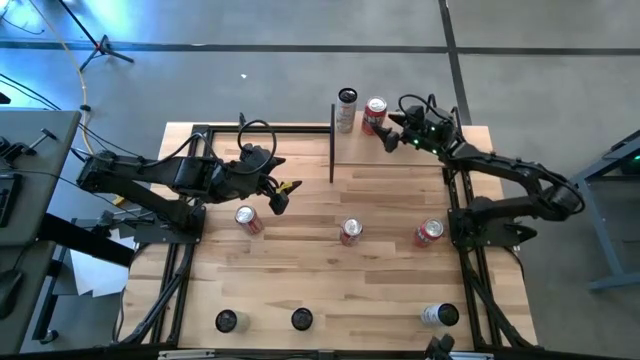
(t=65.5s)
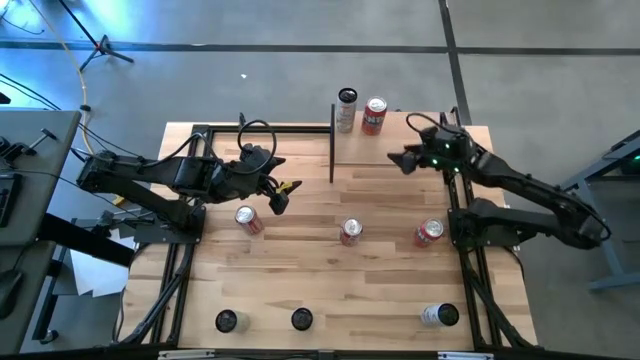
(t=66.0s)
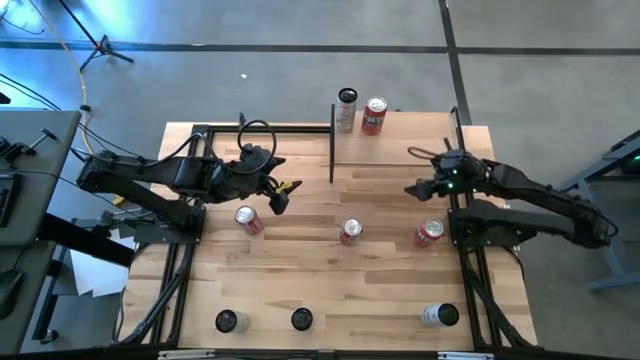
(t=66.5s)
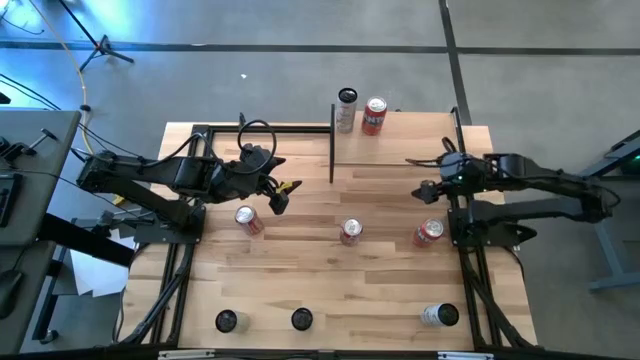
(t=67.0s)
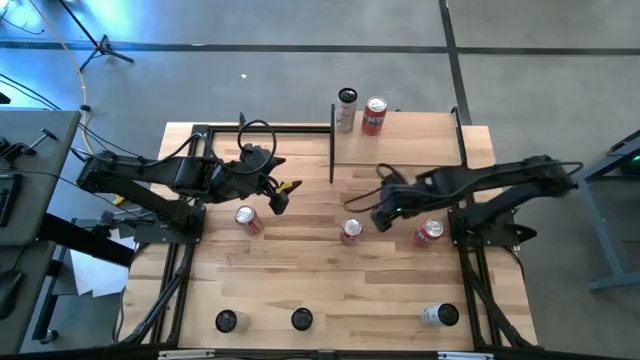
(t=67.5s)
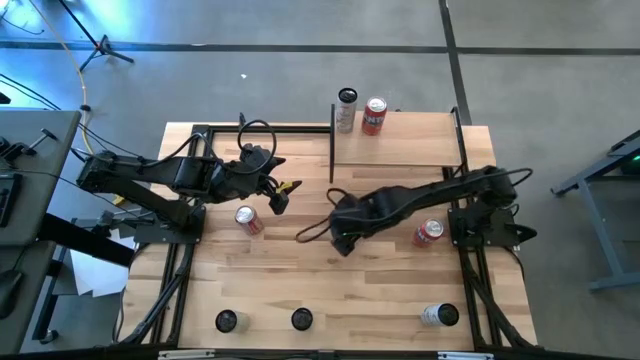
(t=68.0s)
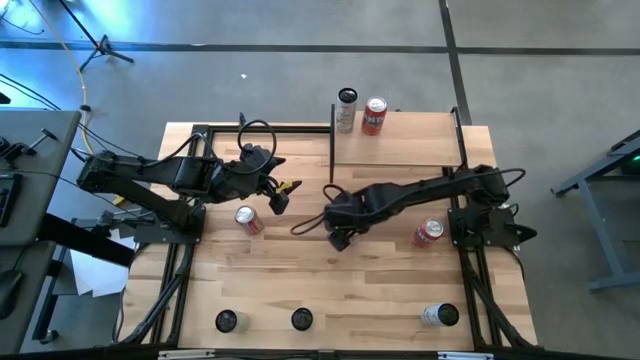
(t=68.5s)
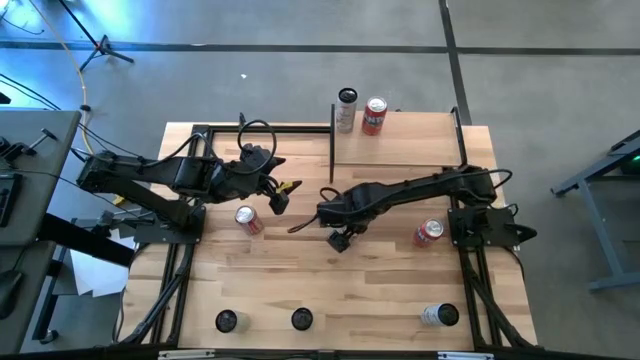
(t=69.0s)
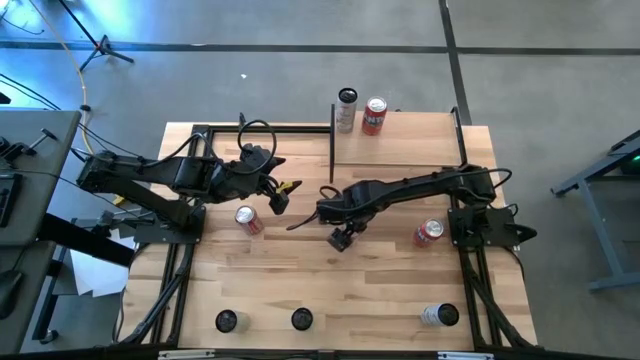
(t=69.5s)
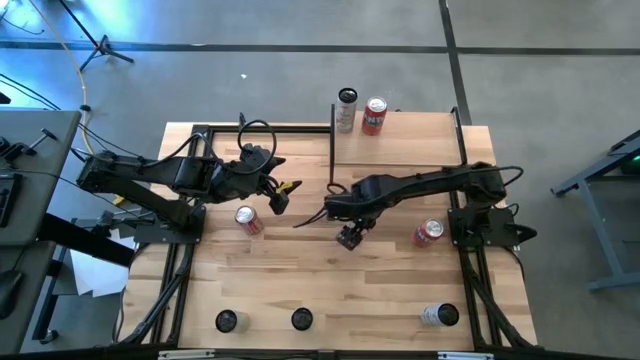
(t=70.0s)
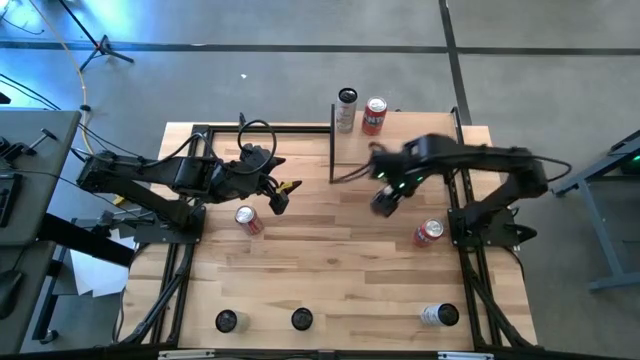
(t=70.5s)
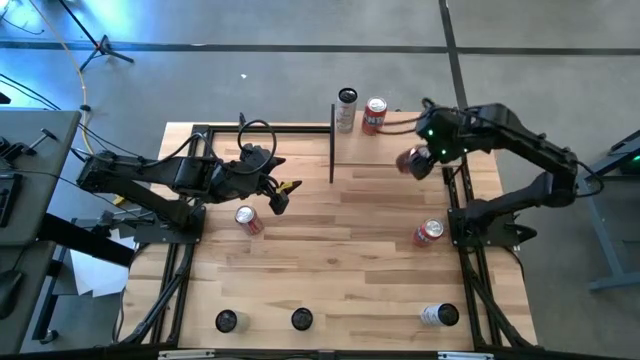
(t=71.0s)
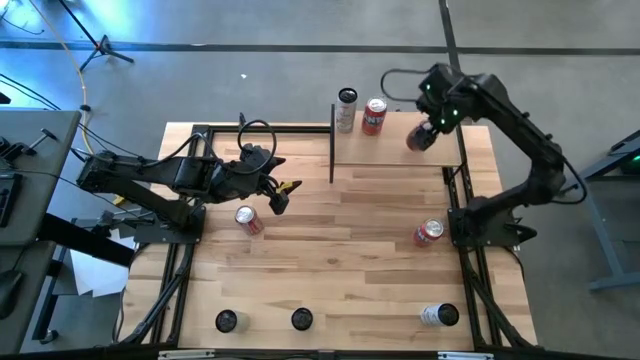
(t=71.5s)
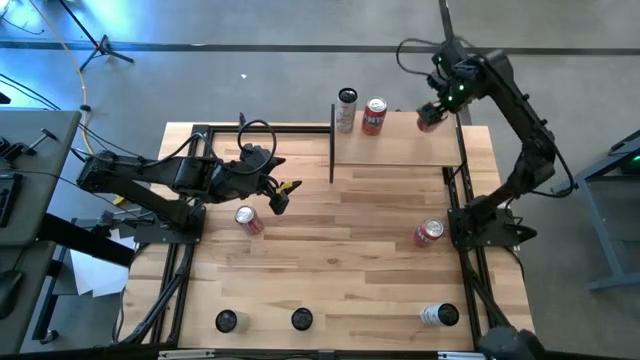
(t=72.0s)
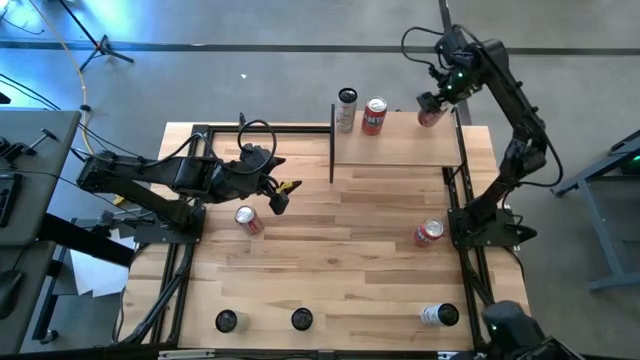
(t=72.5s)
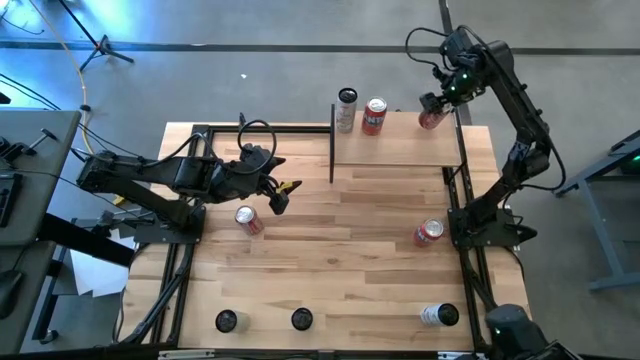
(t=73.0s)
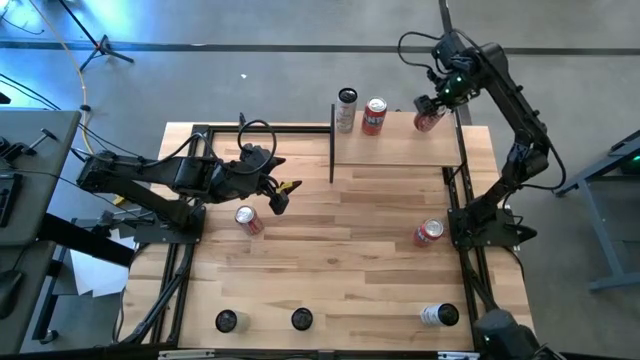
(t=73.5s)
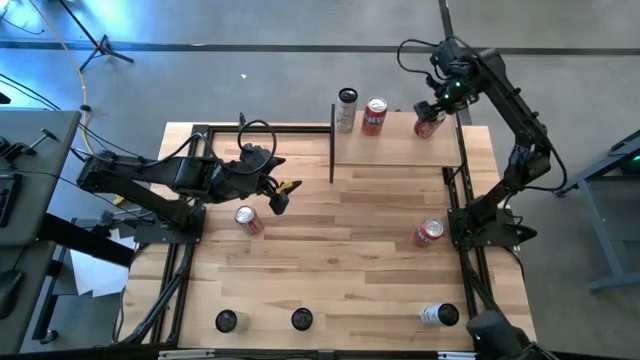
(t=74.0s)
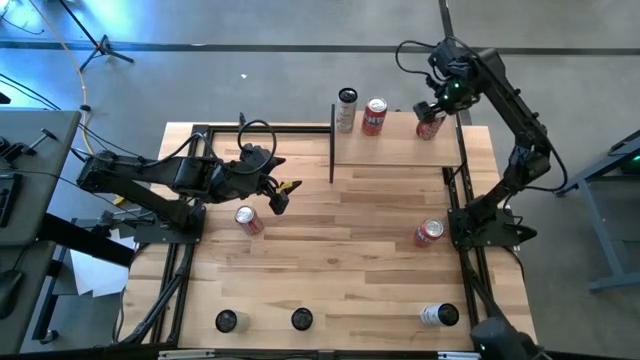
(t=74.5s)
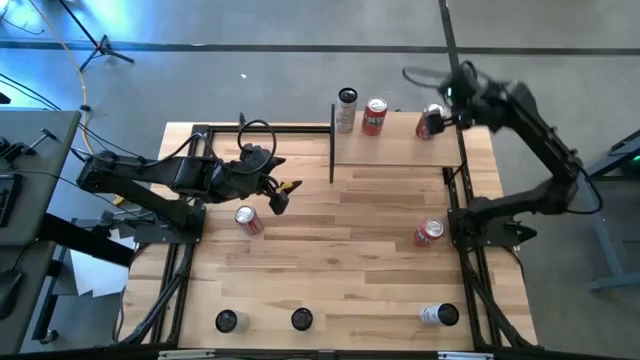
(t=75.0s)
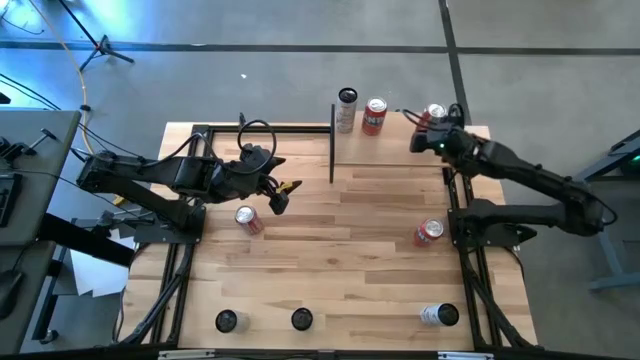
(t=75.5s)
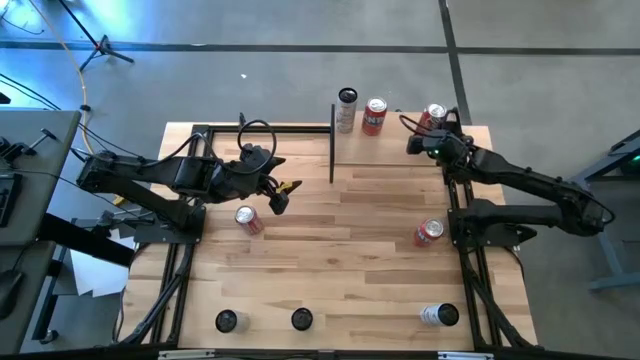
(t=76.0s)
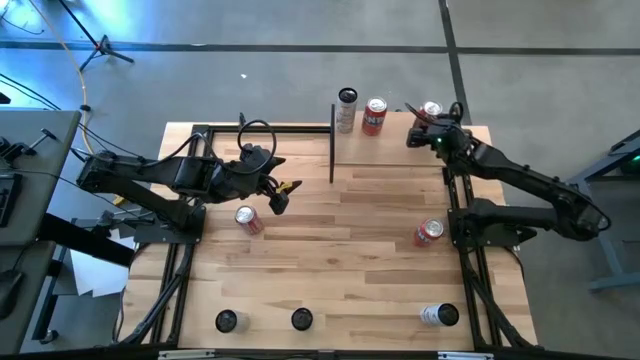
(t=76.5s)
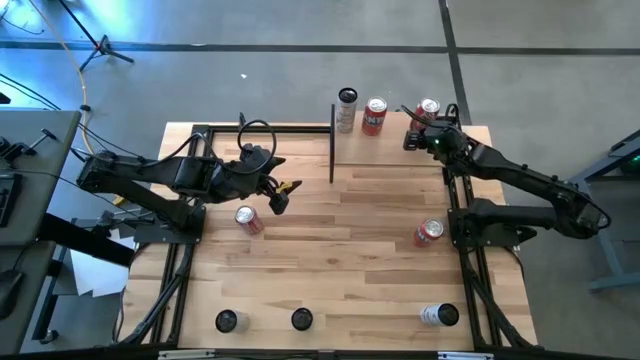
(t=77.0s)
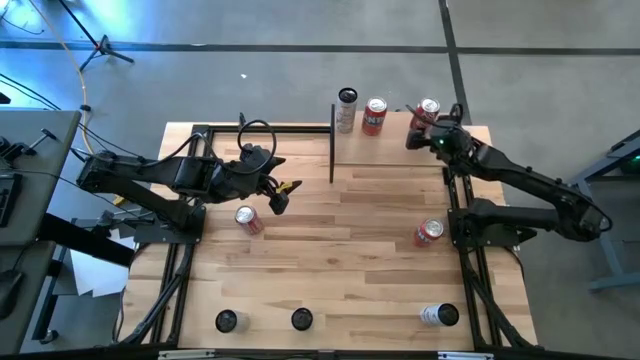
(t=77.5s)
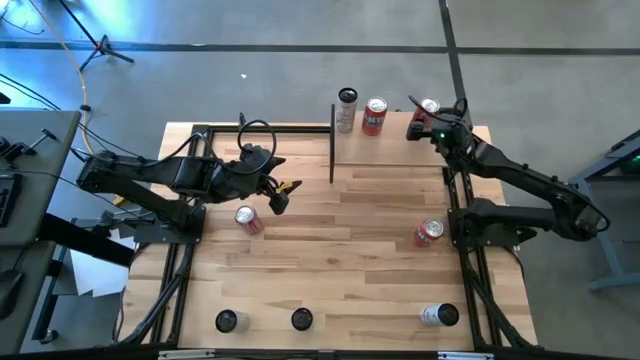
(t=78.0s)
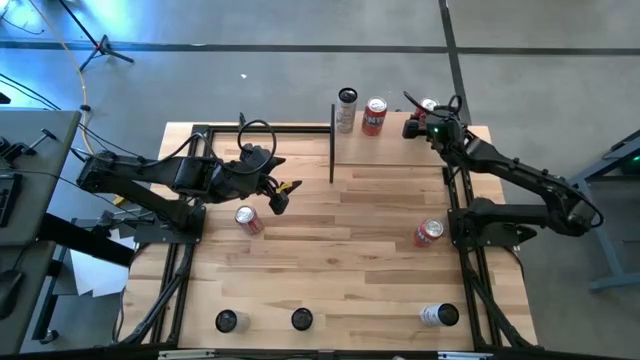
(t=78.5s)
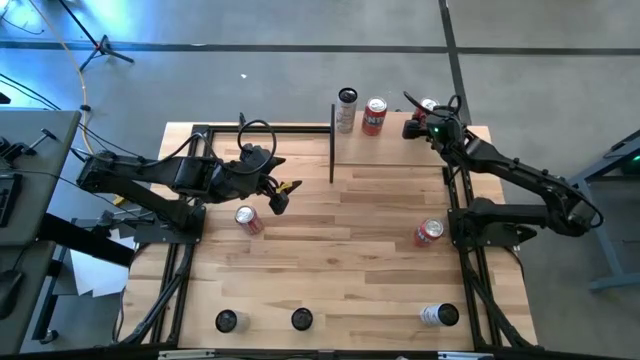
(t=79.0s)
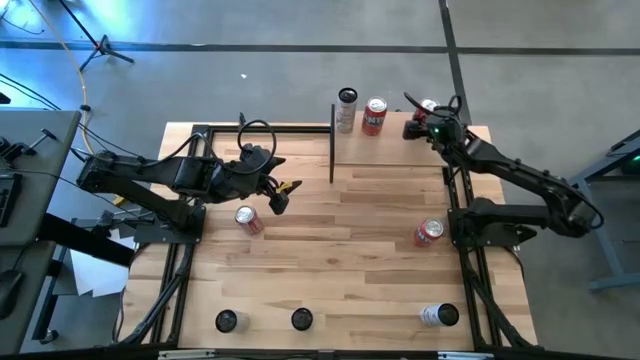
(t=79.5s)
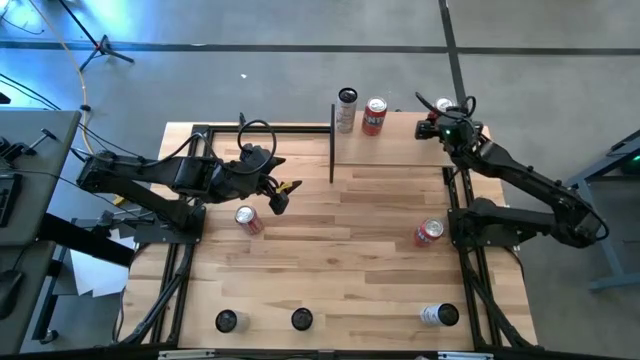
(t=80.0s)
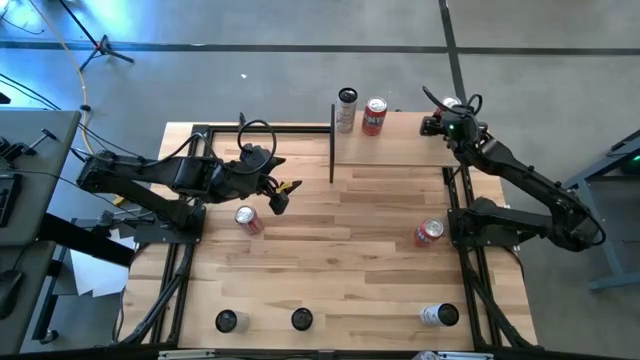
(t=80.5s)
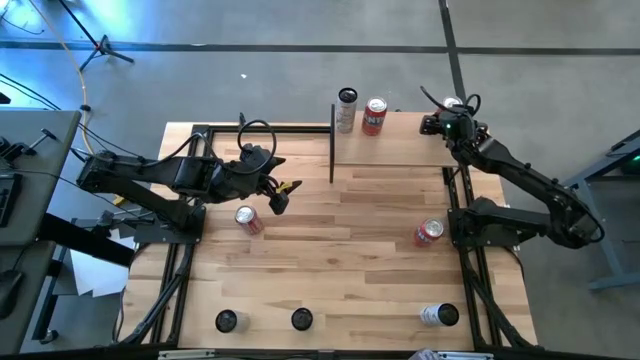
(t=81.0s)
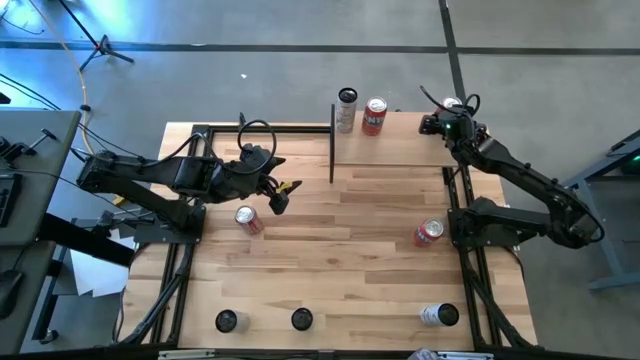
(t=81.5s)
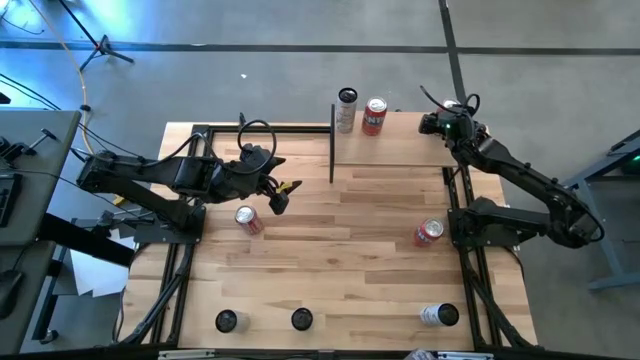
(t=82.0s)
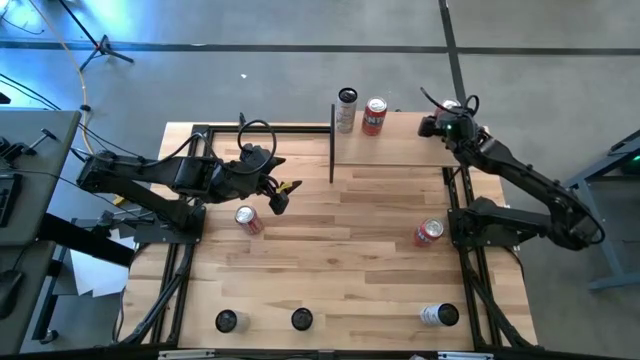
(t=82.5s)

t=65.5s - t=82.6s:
Task: Place canned beverage on shelf
Put the right the red white soda can on the shelf

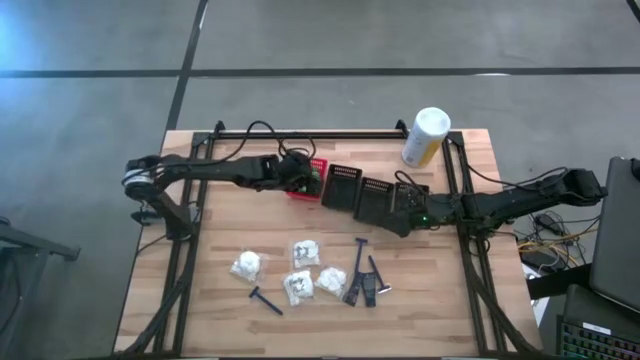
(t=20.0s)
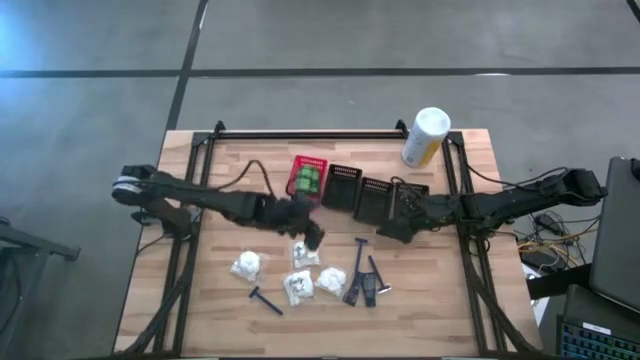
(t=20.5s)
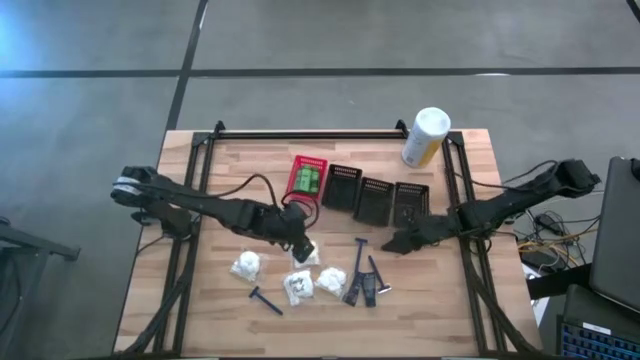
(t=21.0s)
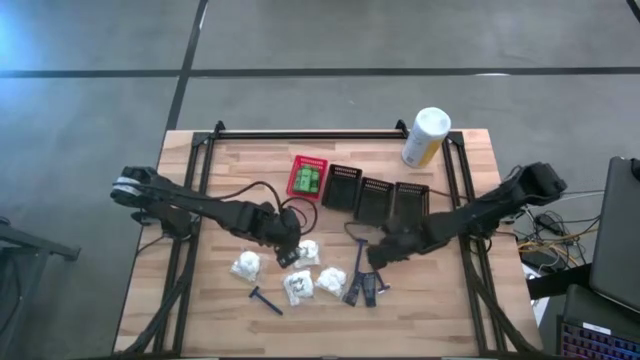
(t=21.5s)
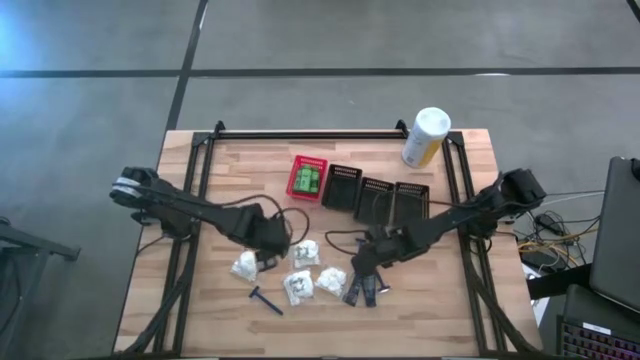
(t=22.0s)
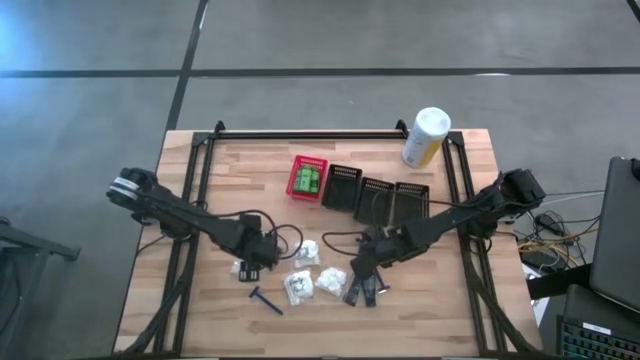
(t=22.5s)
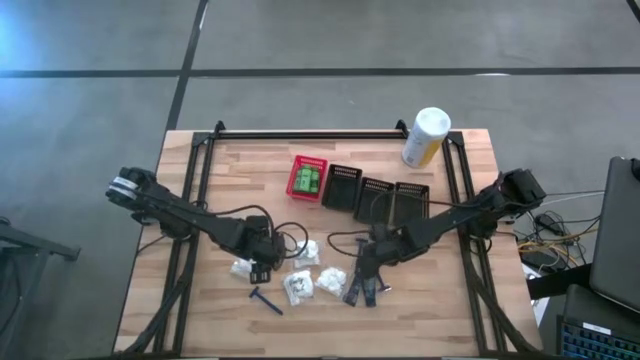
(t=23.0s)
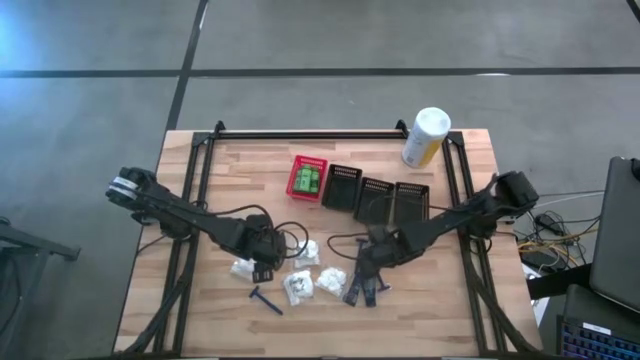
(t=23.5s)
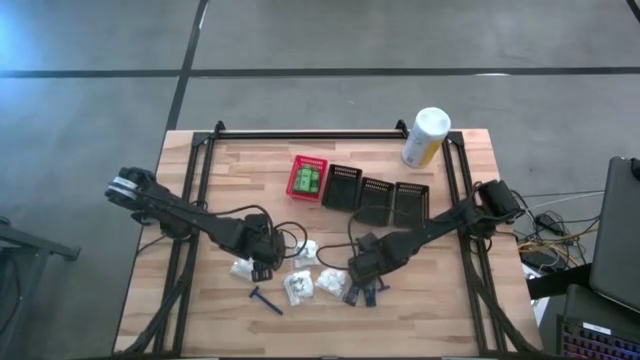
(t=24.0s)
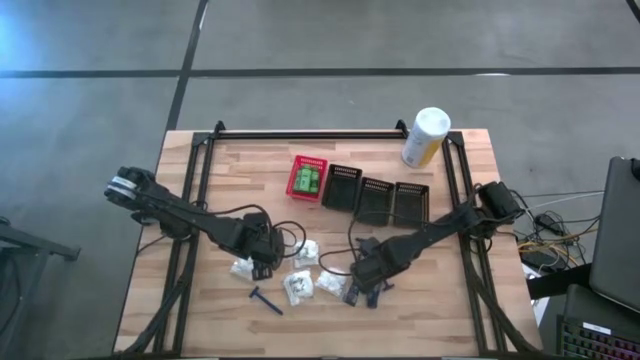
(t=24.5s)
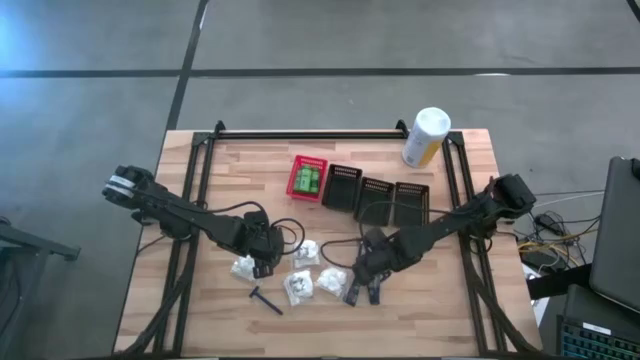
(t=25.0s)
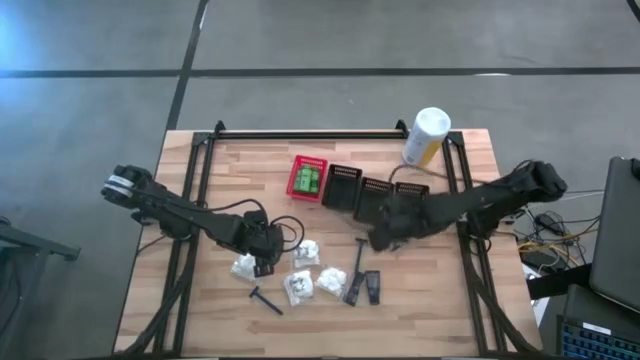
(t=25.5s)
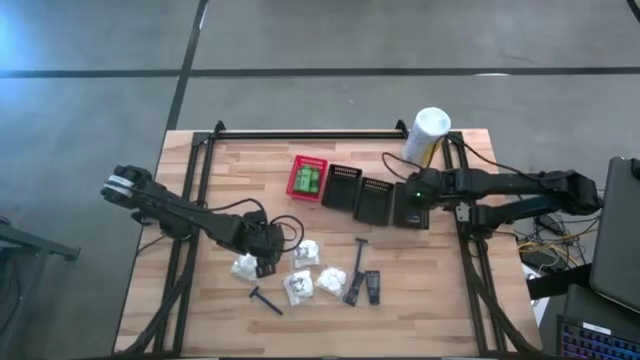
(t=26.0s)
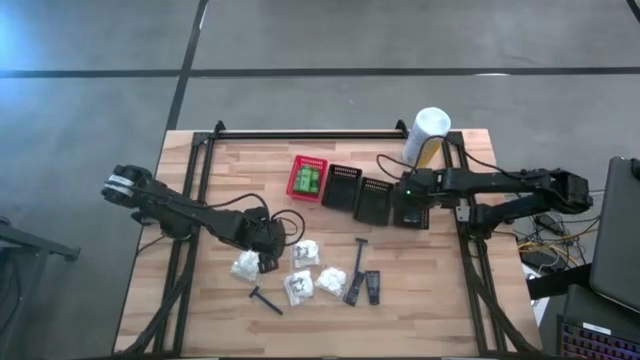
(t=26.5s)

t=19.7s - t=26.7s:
Task: Pick & Place Travel size toiletries
Put the razor into the right black bin
